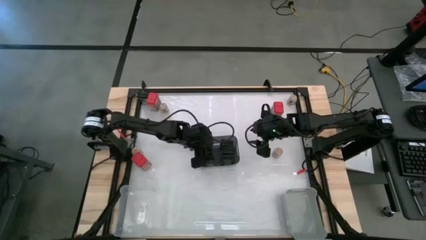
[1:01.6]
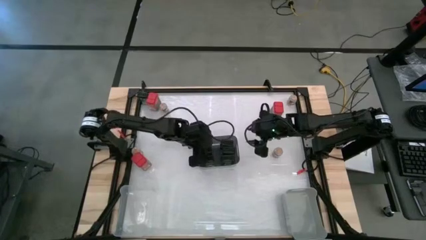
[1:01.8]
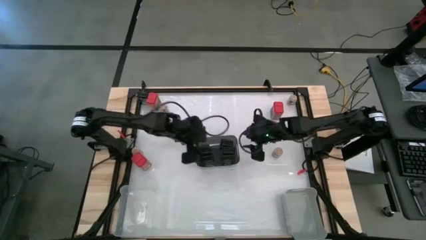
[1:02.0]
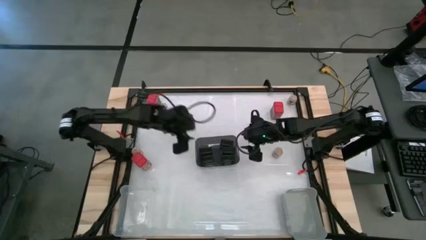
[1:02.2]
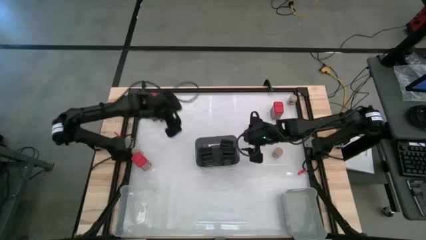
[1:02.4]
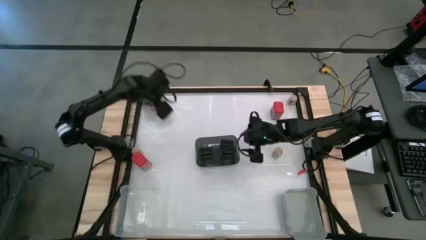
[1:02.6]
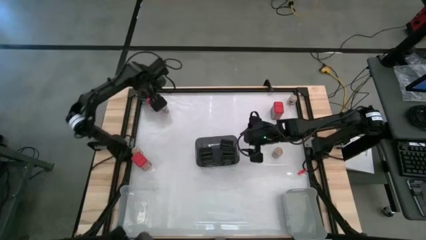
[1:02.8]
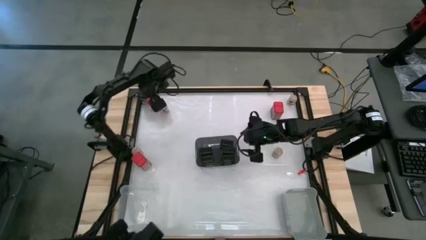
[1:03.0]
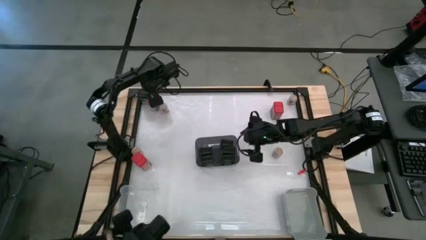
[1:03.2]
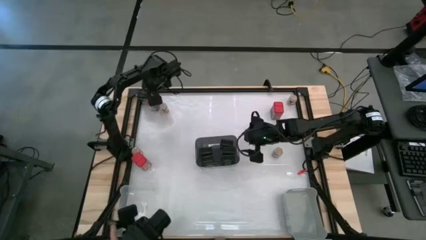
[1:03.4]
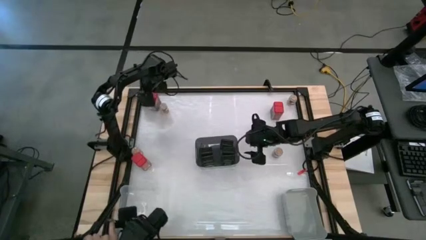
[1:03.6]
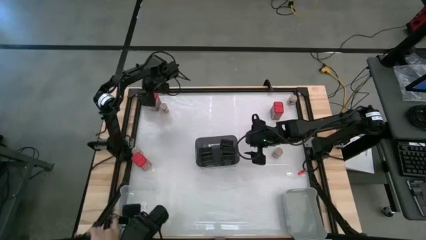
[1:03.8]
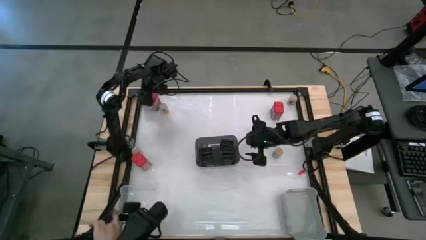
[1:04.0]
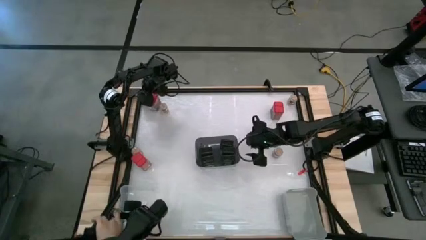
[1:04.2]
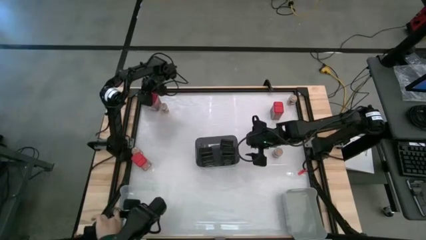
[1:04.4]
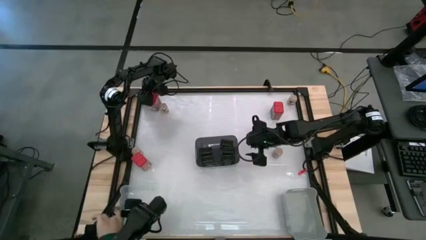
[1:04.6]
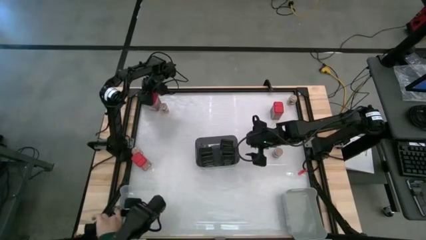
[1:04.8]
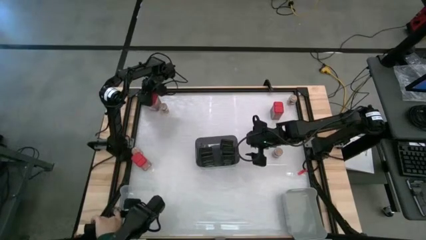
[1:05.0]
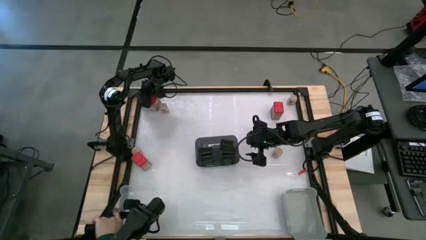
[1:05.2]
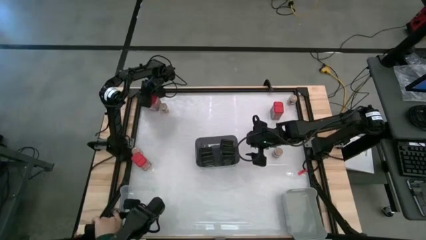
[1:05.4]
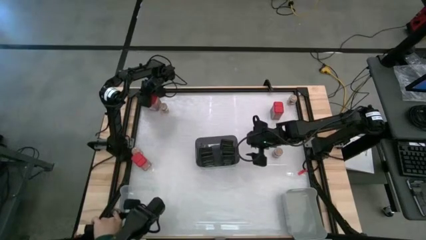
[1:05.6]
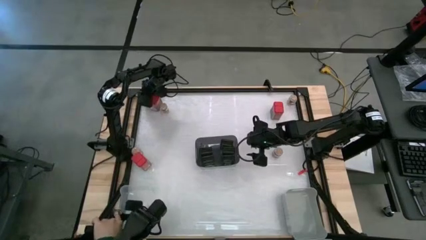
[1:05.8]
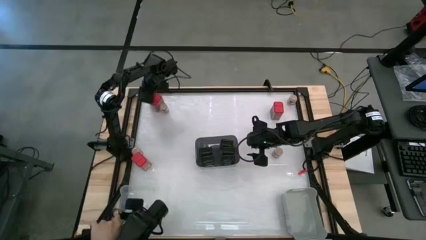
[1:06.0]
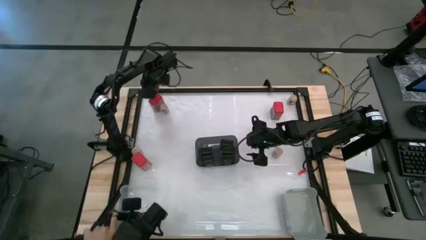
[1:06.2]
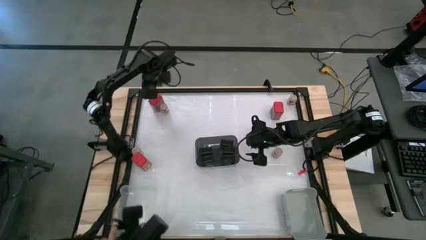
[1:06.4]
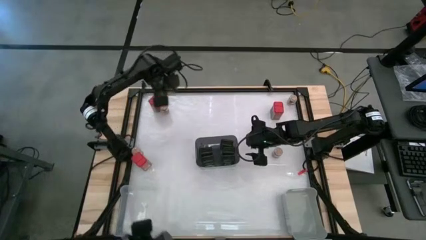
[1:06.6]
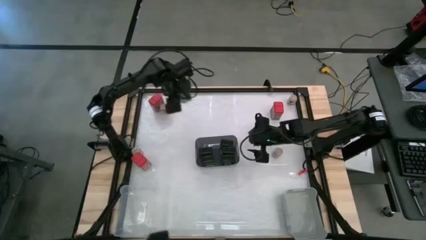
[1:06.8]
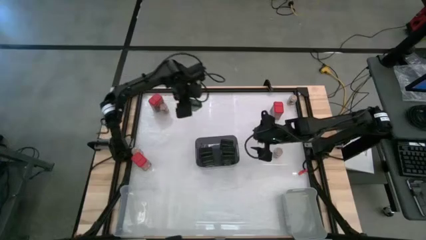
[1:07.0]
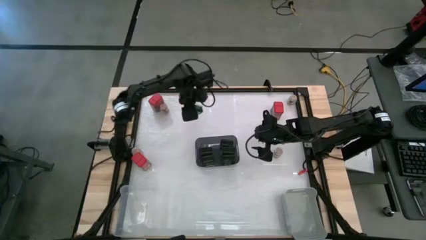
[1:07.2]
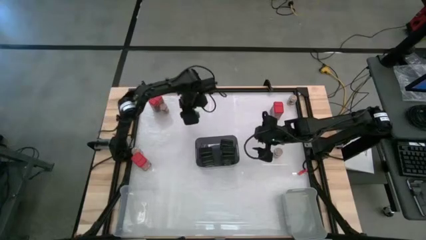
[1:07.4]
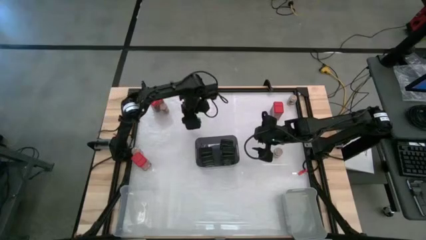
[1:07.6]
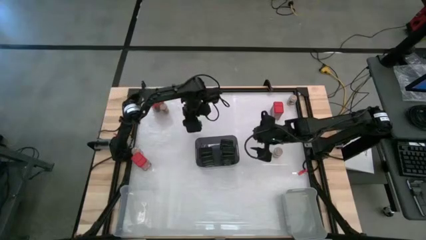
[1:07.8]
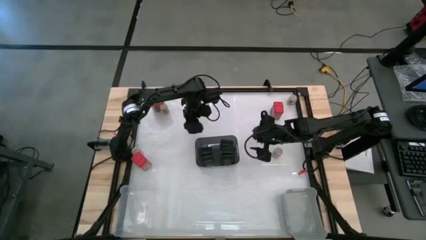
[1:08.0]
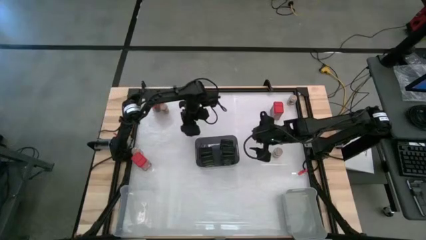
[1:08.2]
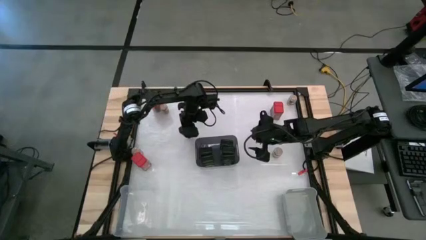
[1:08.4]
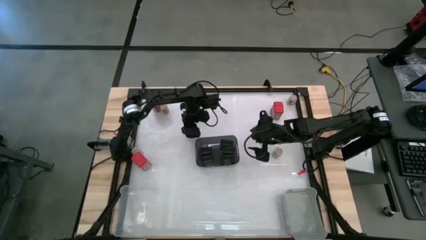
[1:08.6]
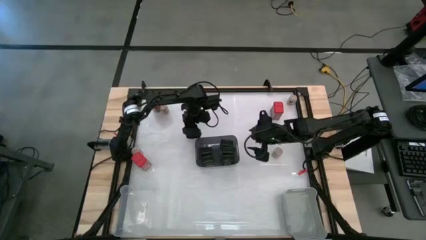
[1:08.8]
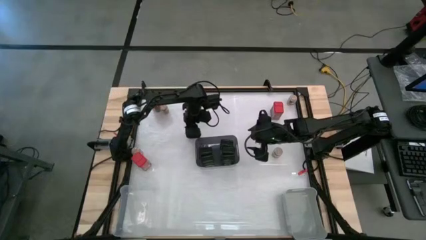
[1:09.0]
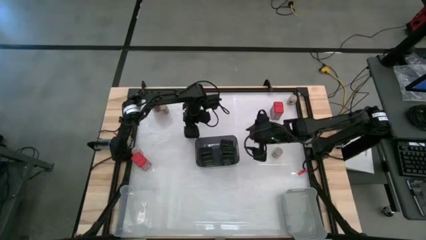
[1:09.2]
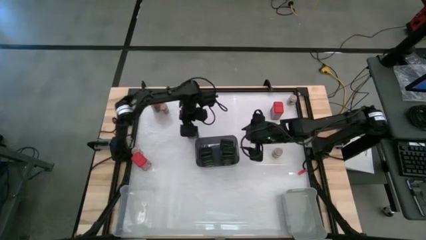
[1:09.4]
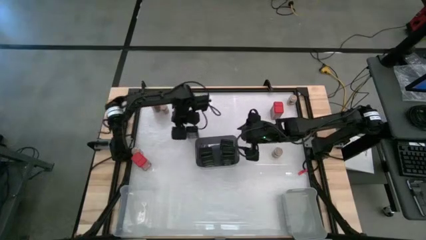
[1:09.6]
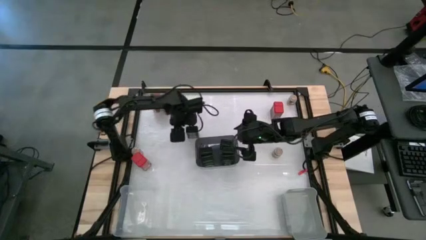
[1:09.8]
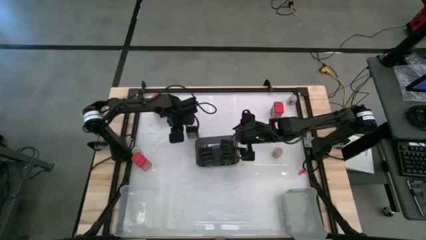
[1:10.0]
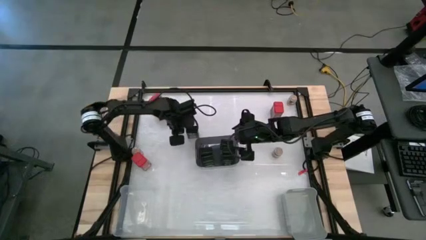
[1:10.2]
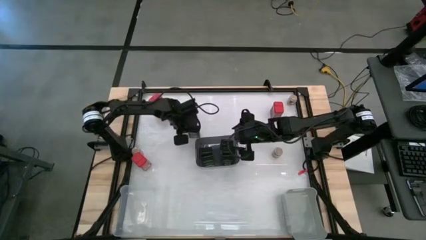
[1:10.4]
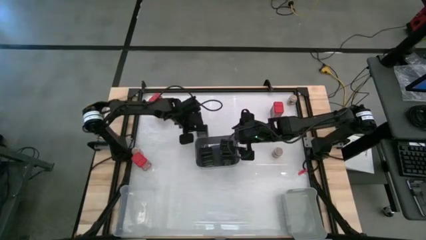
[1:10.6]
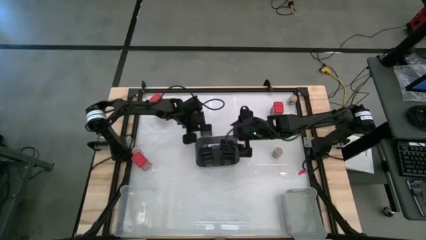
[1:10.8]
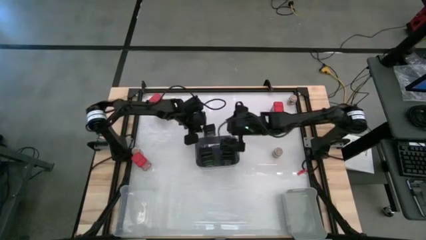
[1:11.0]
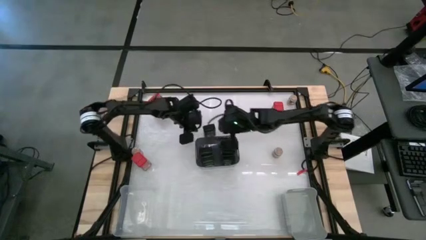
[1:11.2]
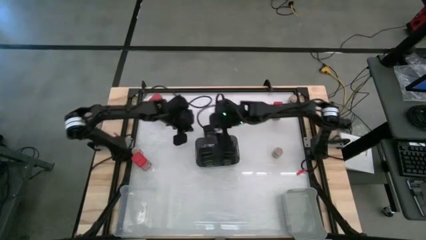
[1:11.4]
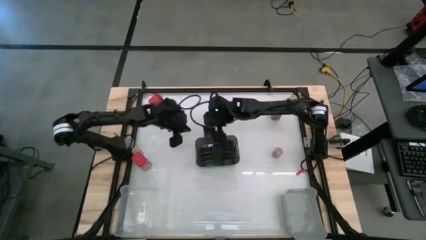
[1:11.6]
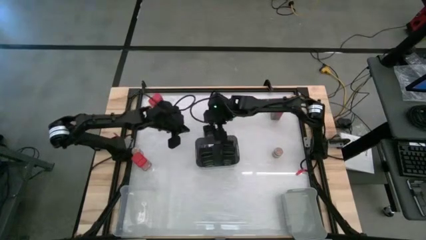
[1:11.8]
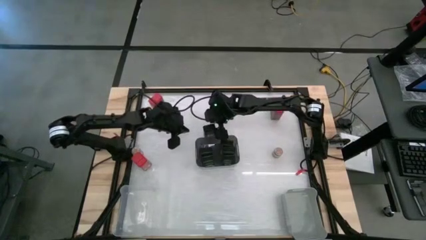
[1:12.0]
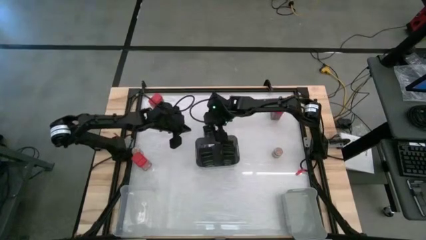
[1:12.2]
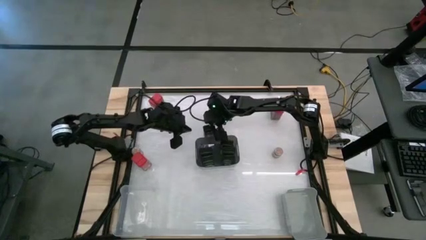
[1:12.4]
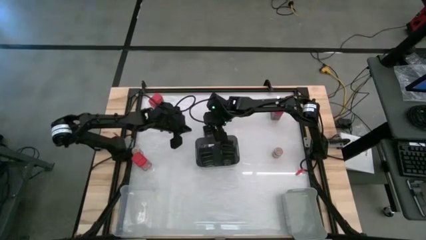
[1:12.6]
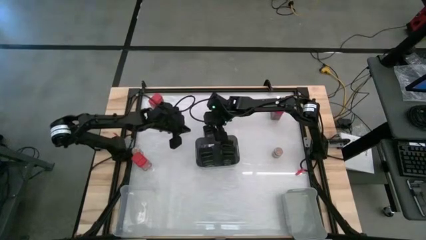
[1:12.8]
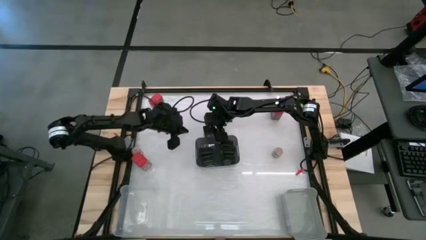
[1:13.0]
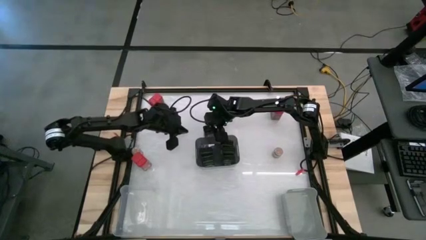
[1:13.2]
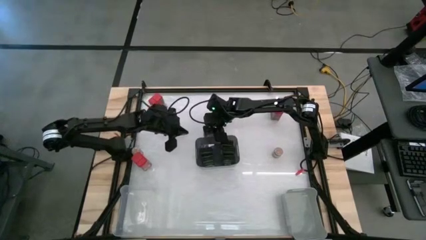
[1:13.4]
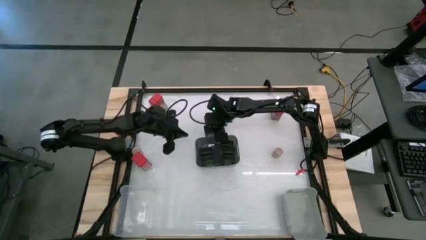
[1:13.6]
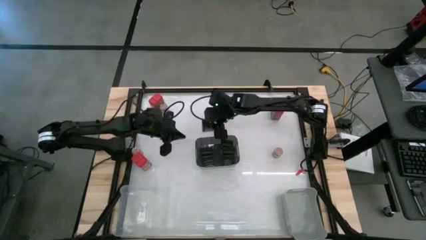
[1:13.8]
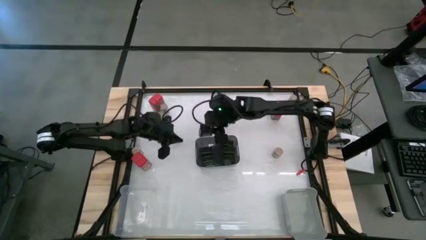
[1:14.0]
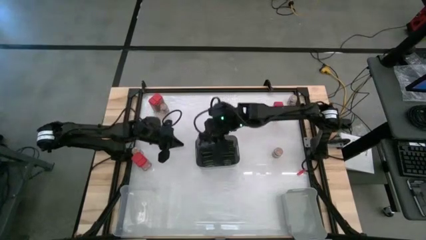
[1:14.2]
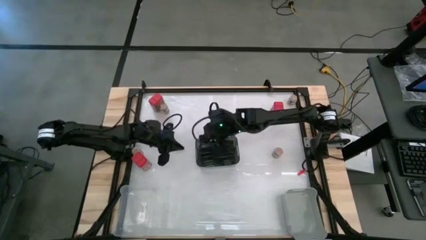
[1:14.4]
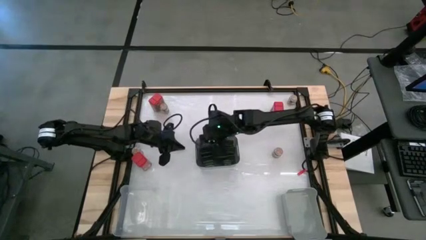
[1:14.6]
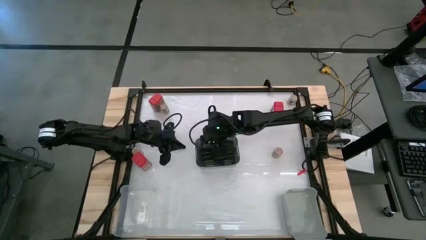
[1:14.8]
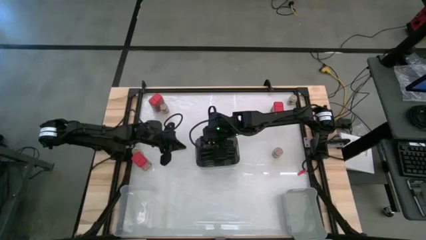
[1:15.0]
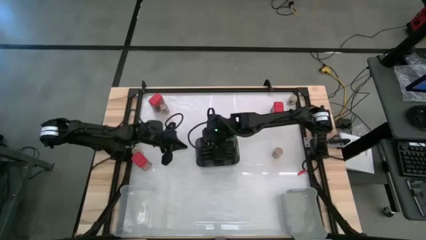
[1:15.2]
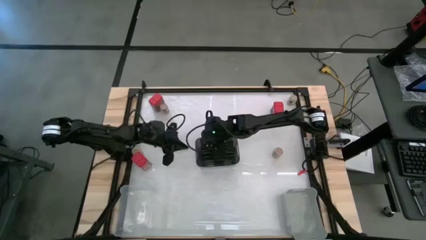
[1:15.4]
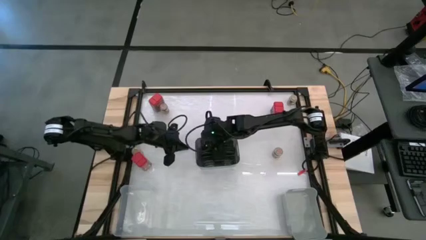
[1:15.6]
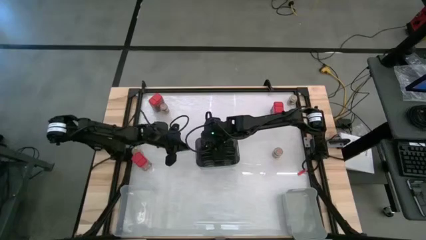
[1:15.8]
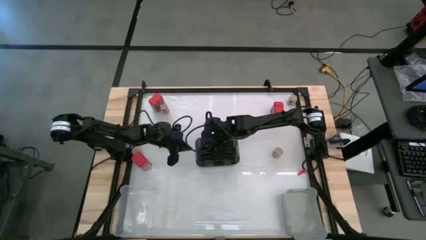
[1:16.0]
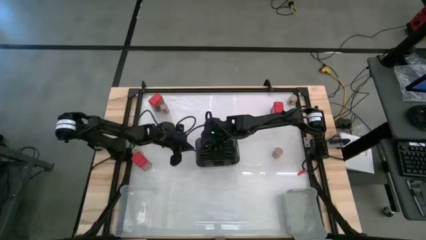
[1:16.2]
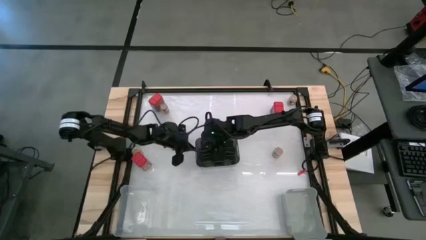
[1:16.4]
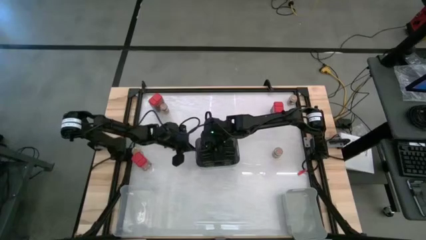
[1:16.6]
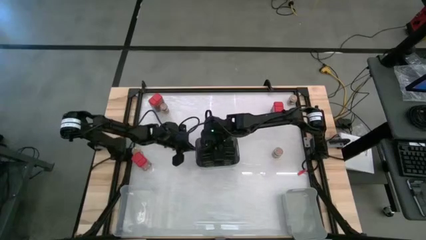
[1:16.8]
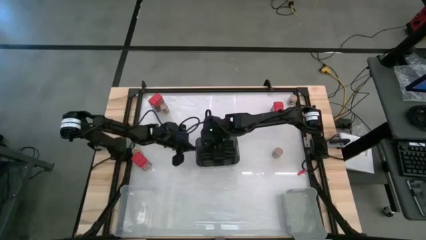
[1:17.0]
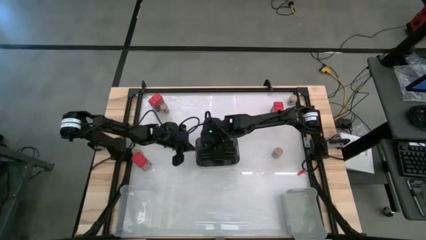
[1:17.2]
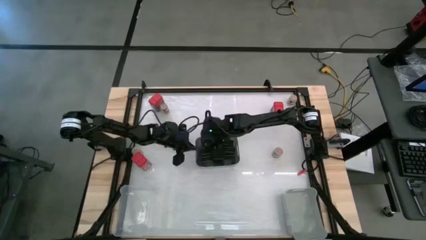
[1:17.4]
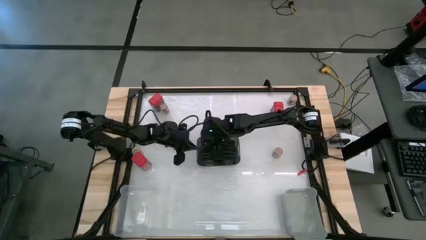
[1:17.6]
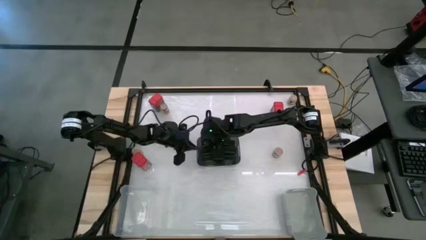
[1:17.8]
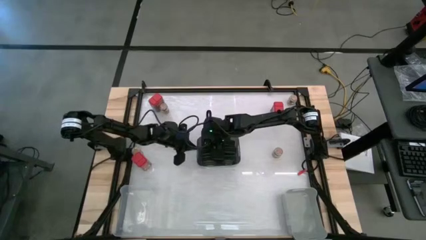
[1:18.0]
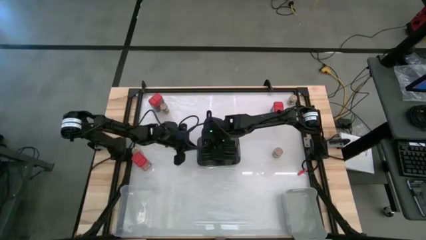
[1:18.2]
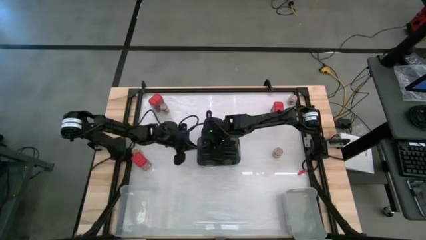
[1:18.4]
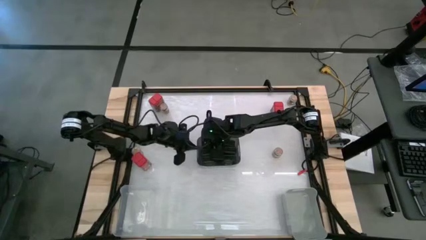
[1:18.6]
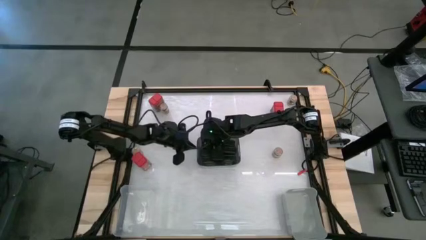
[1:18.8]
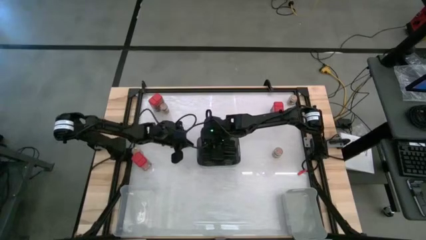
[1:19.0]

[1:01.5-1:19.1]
Task: Sort spices by type
Put the black seasoning can into the black bin
